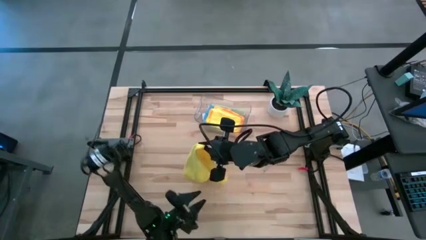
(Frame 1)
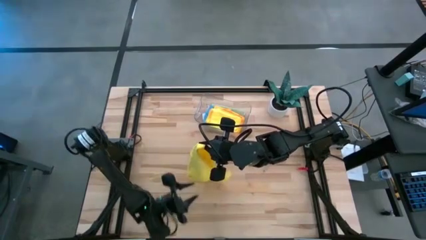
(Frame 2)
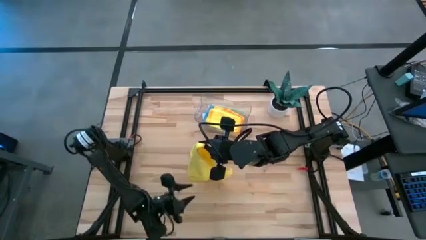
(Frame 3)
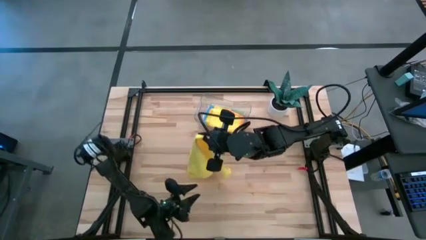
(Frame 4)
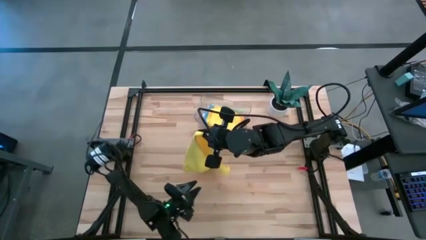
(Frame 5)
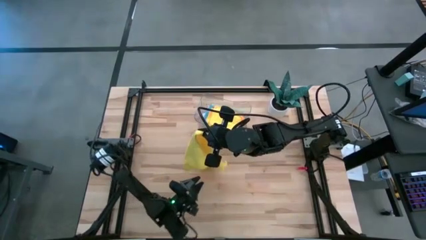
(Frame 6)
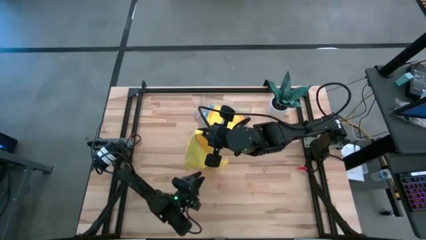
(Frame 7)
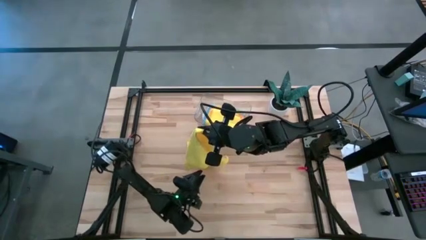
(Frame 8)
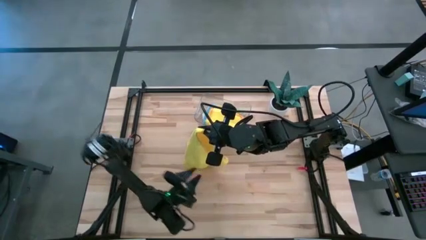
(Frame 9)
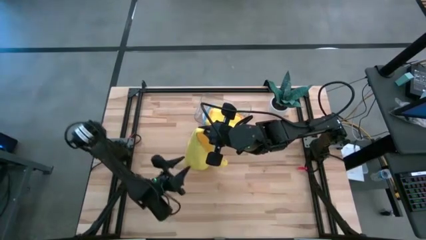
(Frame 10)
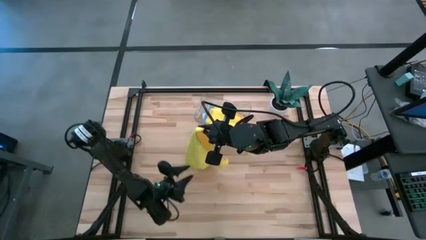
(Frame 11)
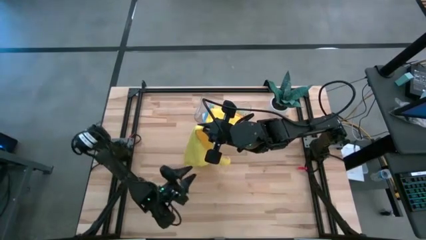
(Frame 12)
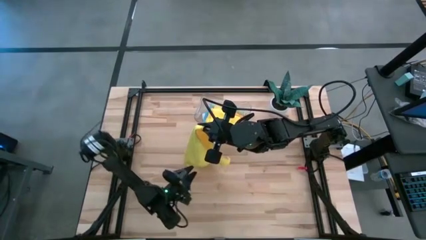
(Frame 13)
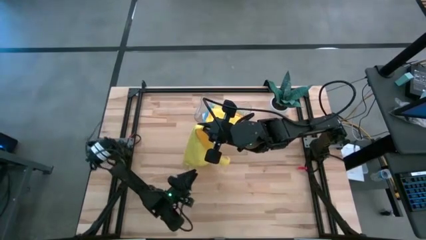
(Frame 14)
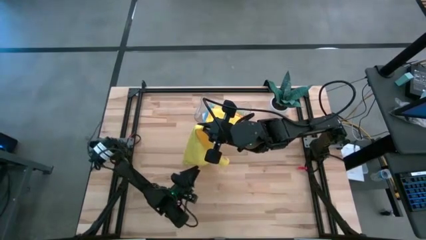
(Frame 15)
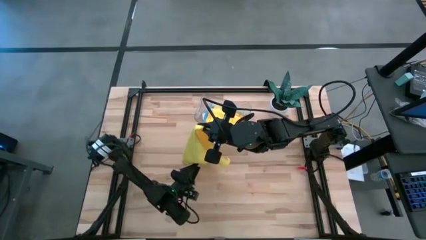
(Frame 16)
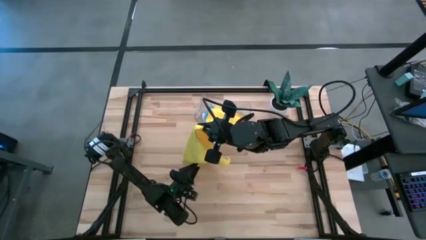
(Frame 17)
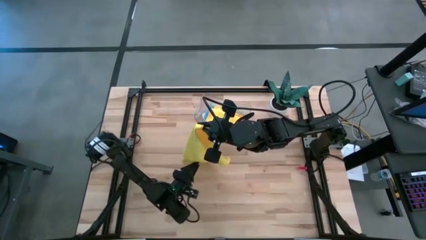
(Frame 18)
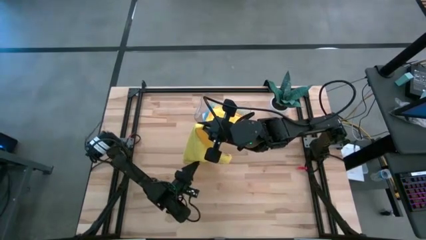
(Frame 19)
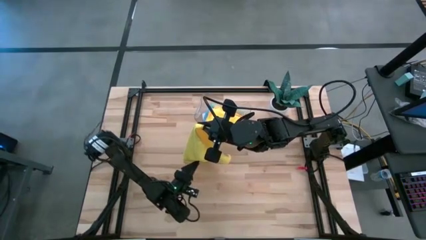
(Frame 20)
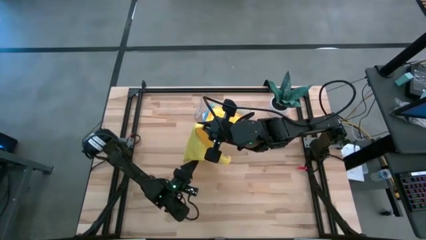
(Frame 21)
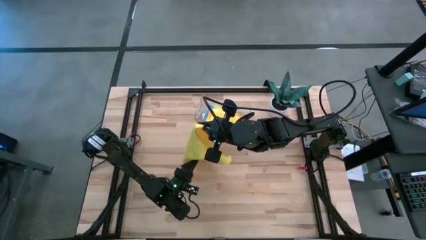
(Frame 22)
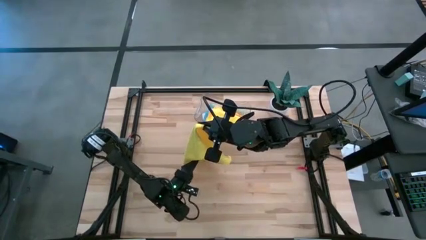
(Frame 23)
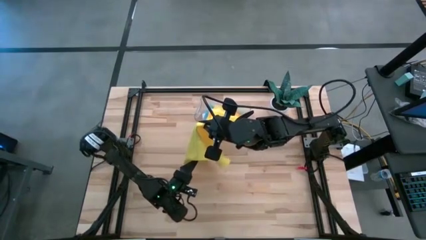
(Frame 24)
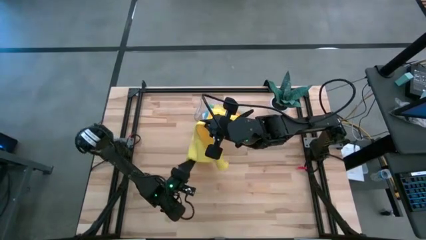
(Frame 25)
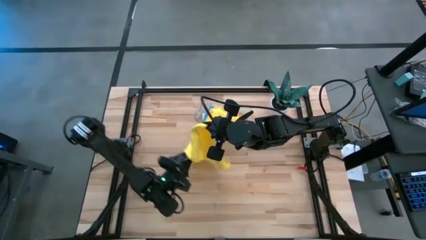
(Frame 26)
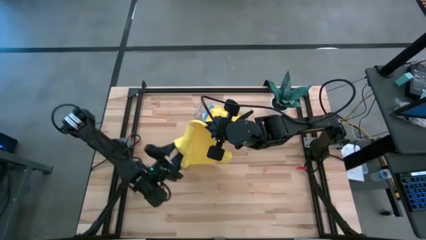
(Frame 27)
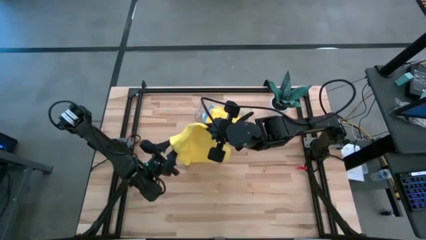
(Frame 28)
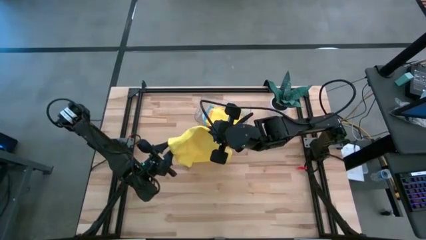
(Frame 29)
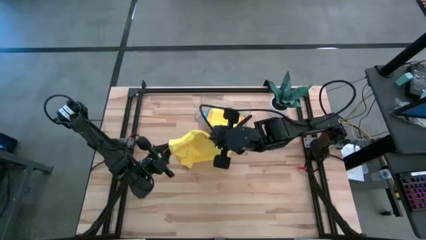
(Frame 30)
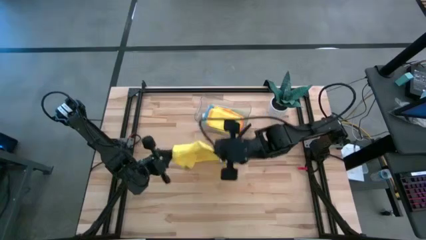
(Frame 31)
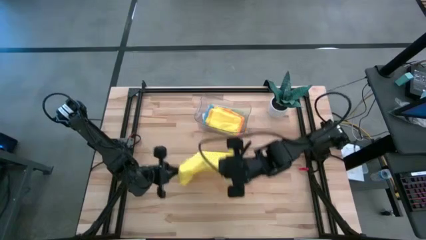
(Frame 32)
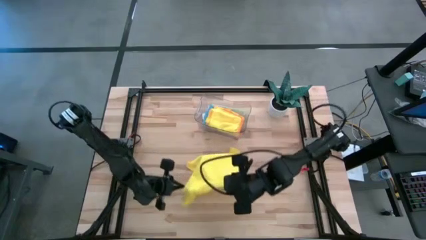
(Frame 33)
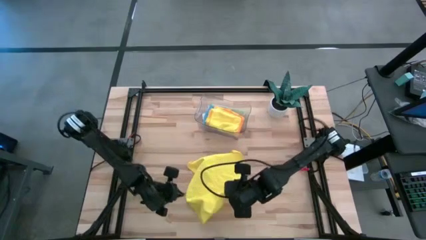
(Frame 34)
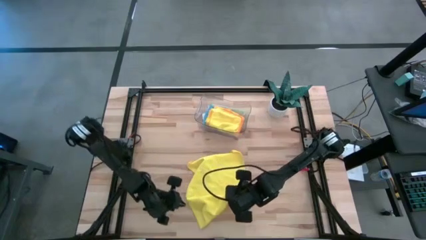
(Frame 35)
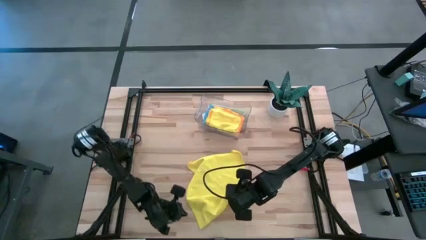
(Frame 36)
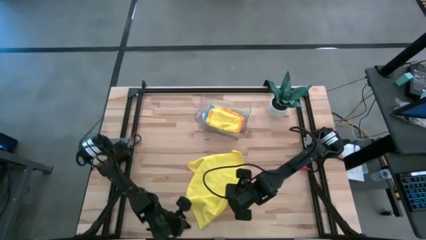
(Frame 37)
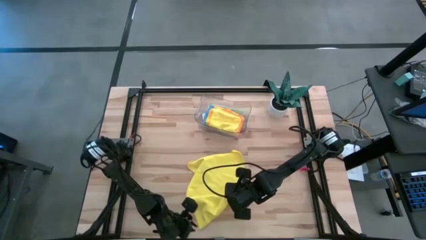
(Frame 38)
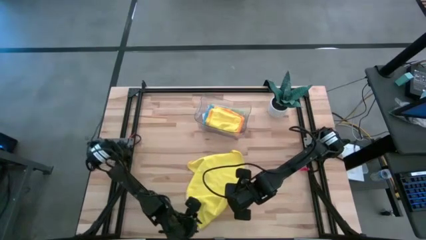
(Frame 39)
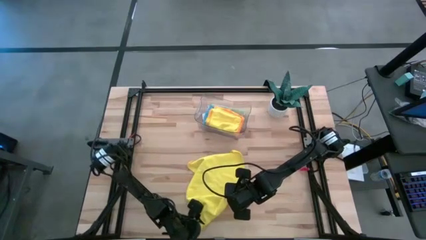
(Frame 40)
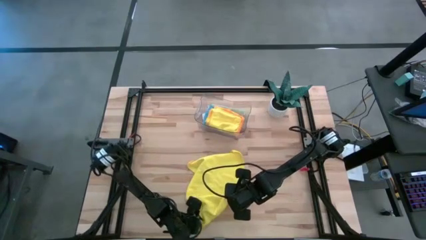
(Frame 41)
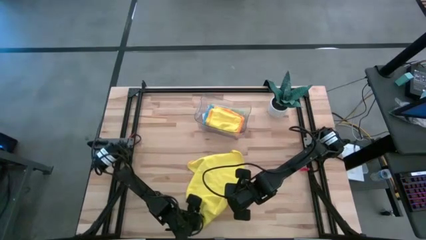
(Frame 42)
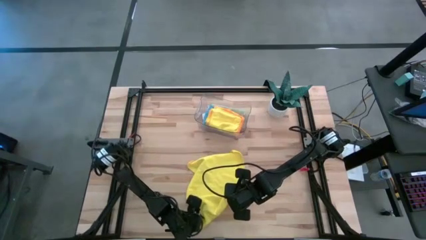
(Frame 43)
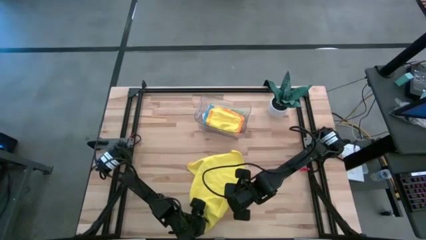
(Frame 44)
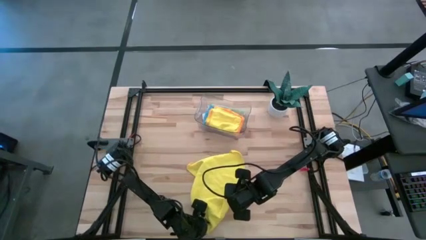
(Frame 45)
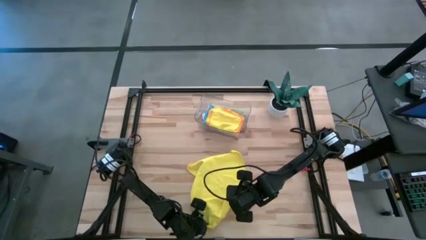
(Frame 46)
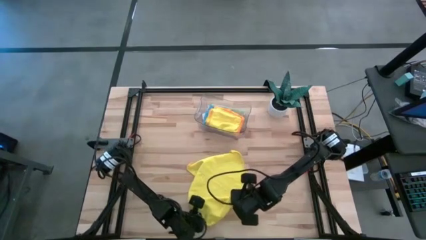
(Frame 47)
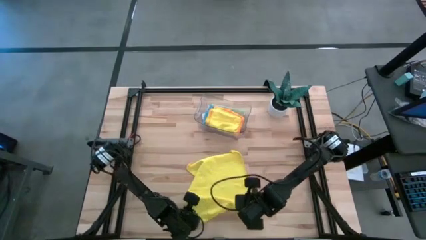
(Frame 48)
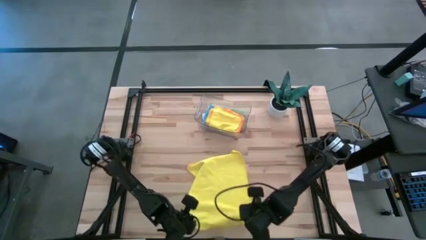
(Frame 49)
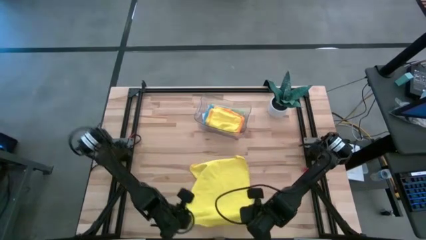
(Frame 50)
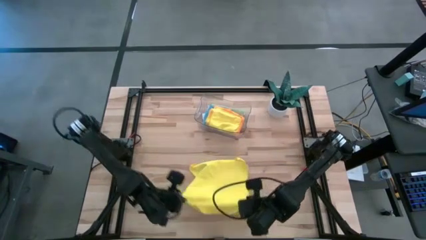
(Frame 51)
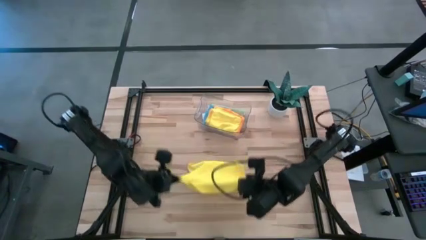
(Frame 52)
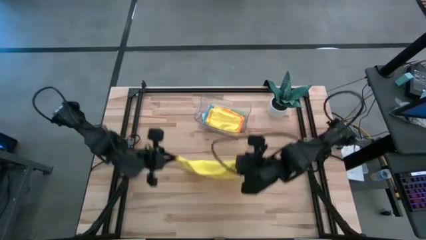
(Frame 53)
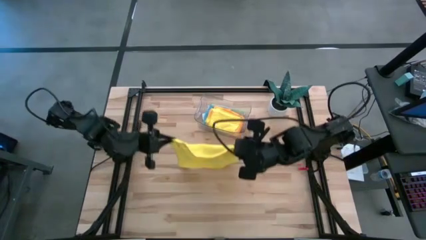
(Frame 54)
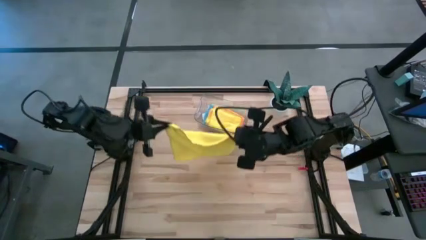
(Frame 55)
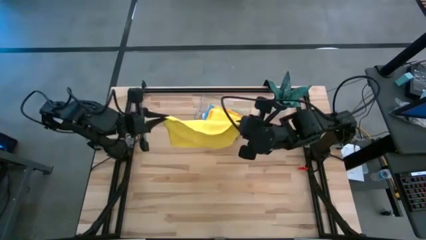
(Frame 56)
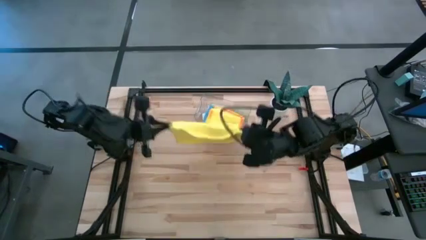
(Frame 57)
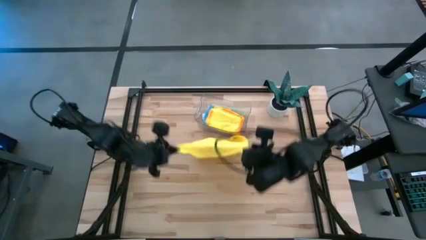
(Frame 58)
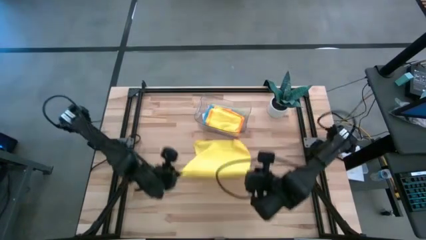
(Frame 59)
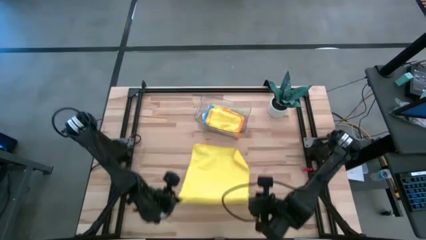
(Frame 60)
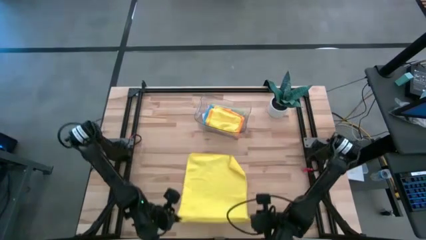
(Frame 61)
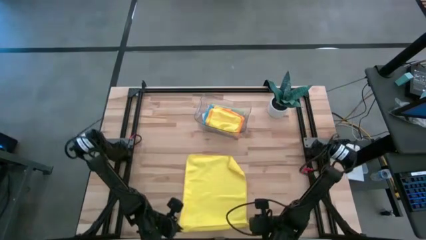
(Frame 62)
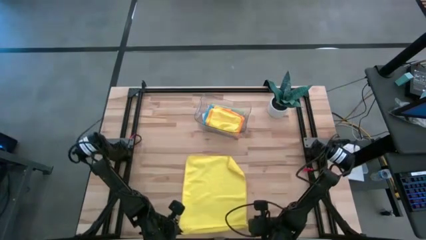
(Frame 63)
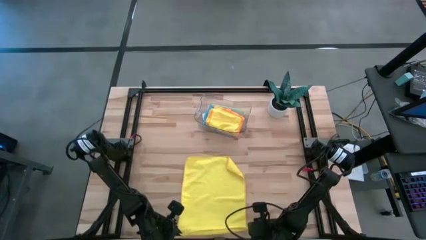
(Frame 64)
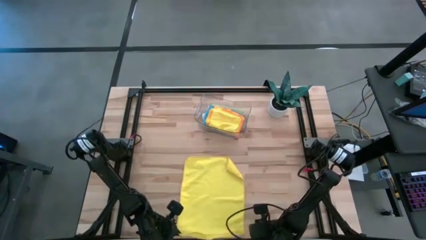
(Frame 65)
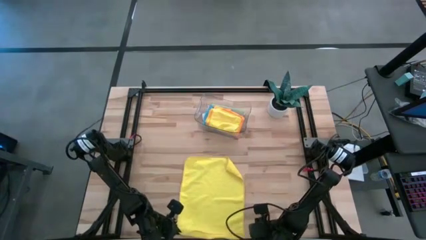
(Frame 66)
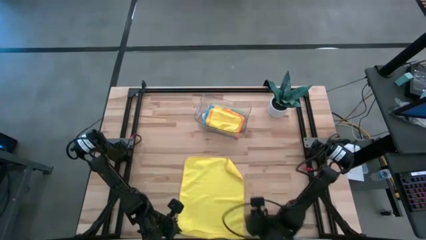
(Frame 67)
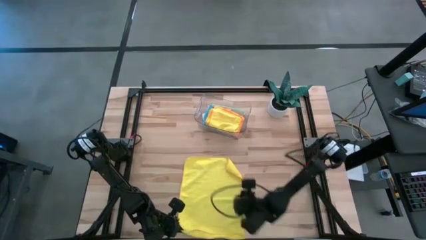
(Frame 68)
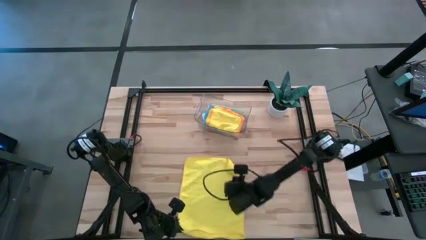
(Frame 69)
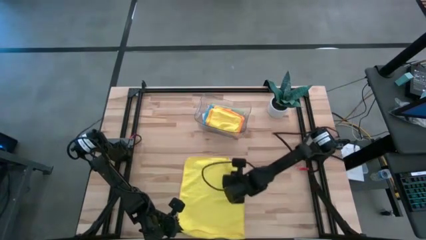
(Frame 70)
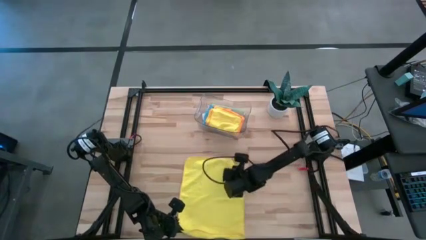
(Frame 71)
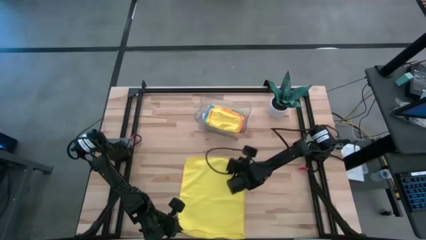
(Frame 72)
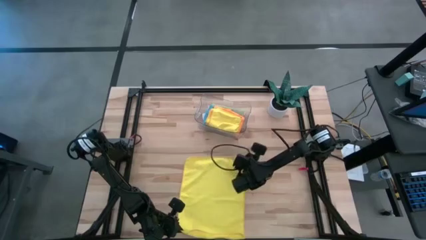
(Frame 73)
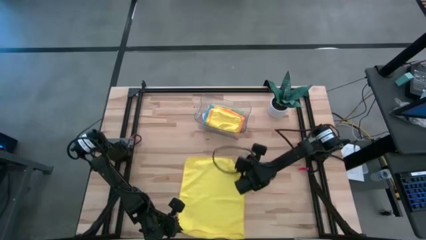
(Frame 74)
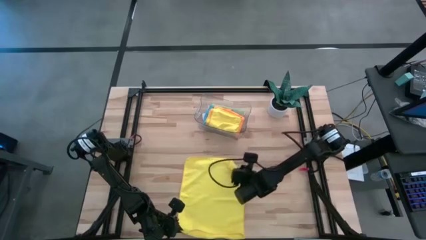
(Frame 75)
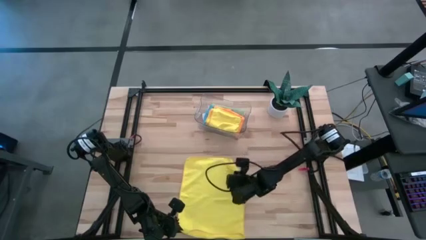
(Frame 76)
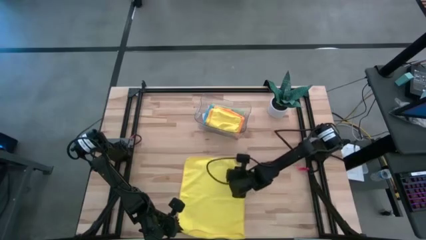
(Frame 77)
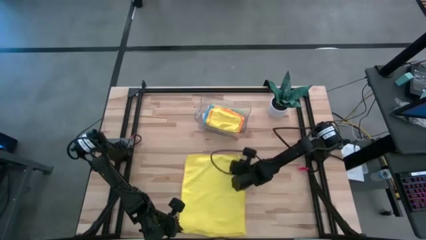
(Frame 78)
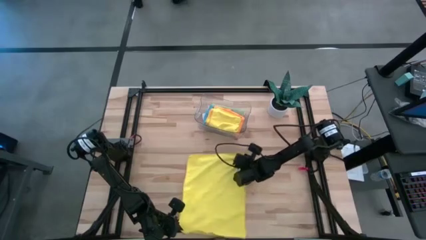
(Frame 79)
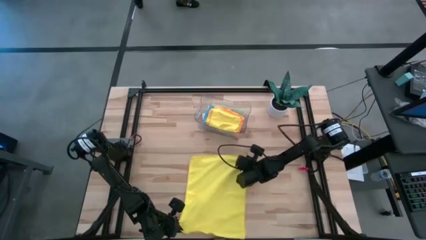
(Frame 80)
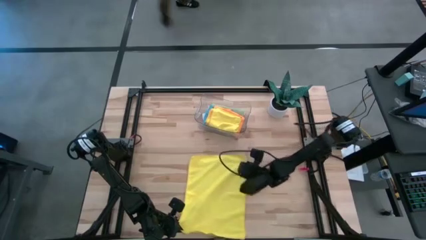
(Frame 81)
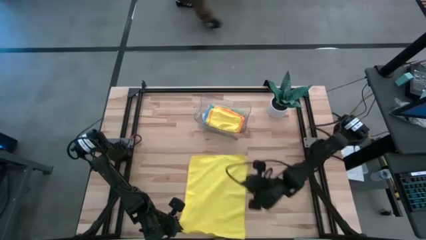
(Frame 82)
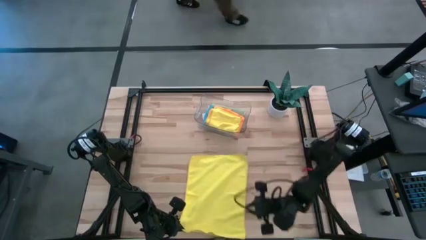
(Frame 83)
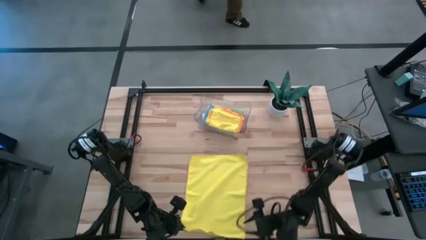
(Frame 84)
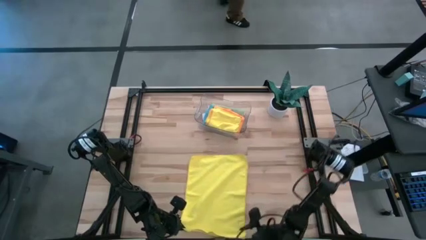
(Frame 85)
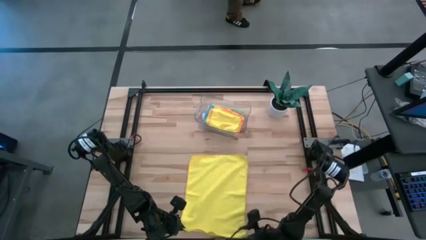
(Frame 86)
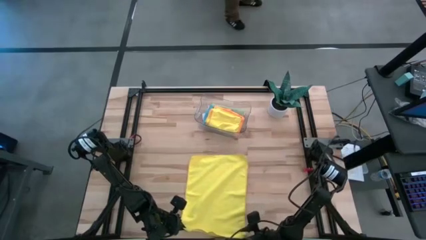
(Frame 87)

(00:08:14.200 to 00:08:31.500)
Task: Fold microfiber towels
Fold the yellow towel
